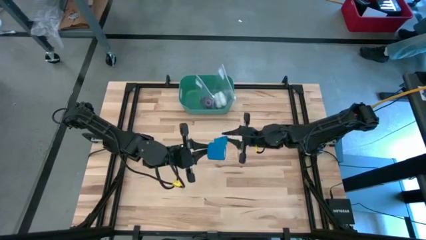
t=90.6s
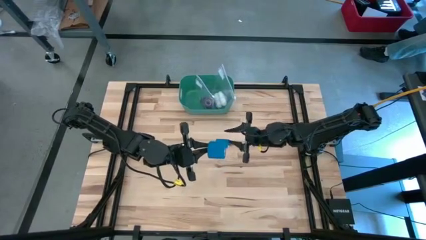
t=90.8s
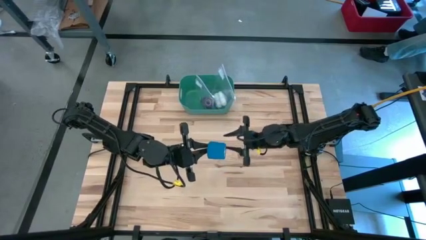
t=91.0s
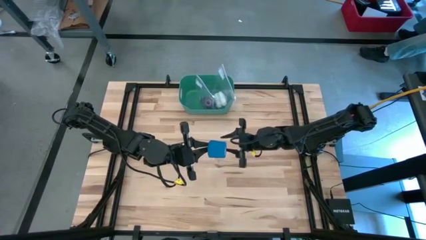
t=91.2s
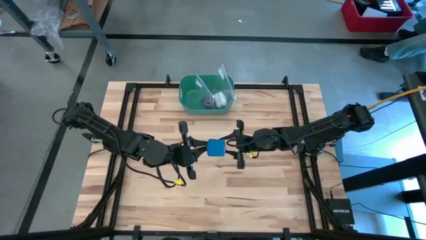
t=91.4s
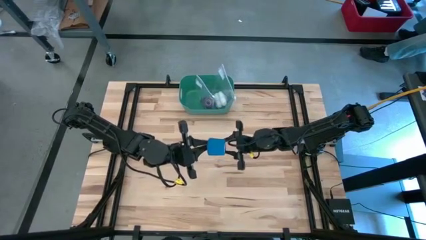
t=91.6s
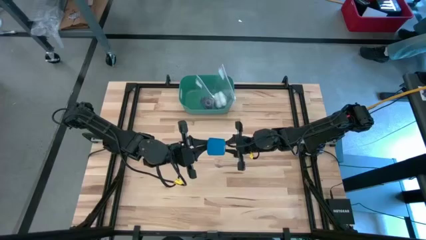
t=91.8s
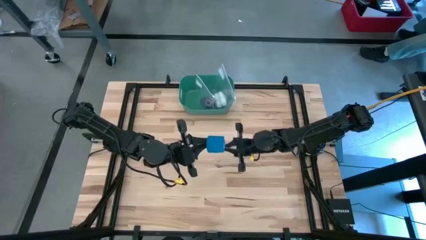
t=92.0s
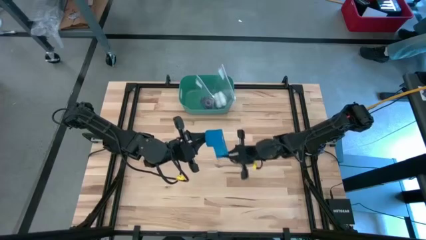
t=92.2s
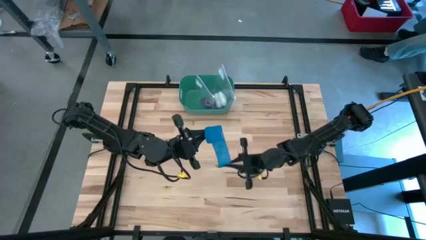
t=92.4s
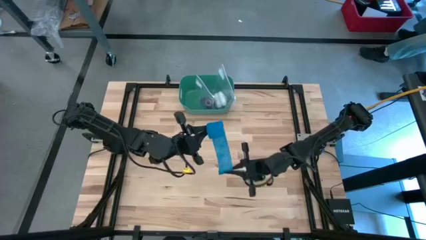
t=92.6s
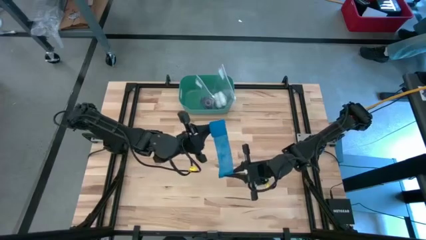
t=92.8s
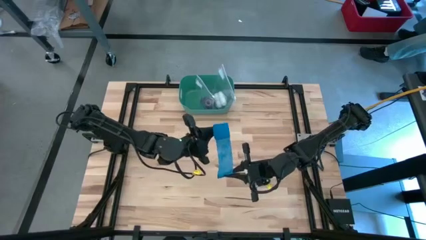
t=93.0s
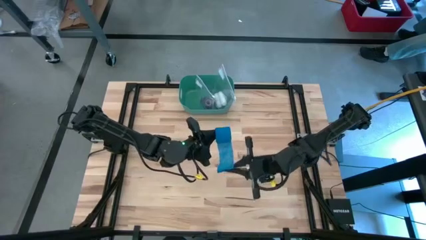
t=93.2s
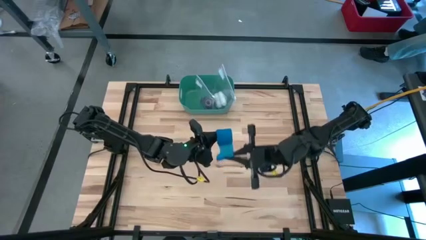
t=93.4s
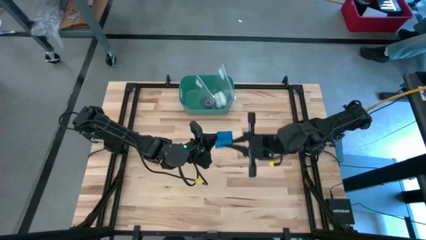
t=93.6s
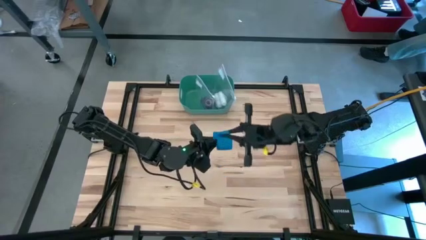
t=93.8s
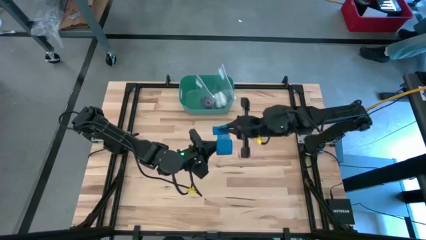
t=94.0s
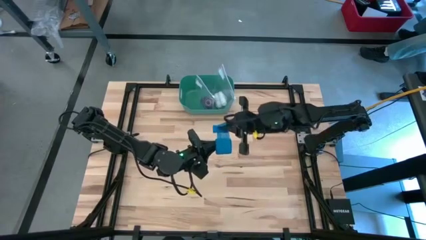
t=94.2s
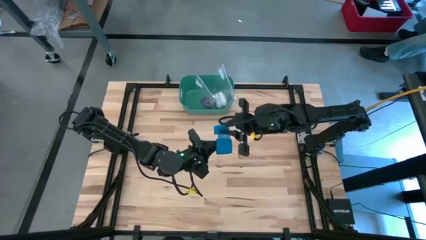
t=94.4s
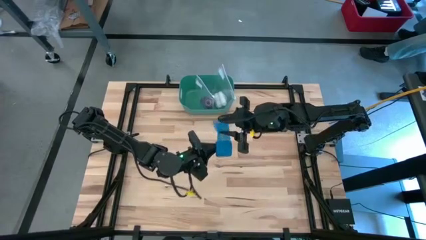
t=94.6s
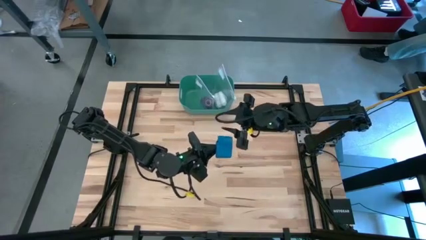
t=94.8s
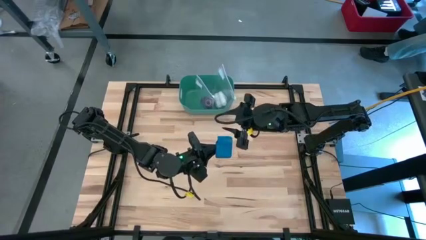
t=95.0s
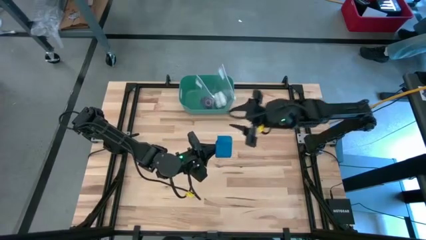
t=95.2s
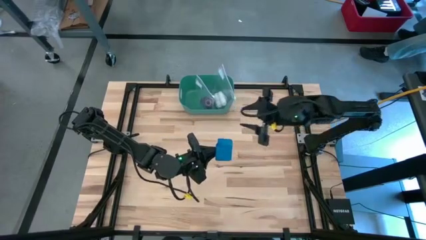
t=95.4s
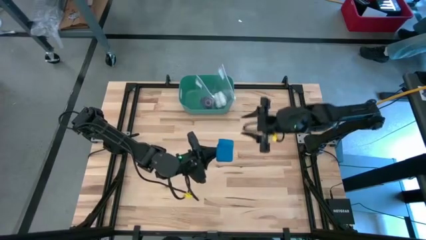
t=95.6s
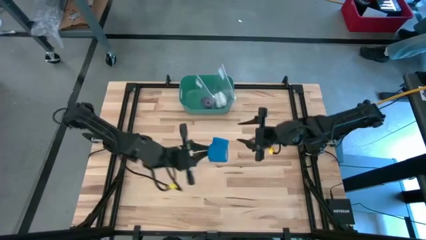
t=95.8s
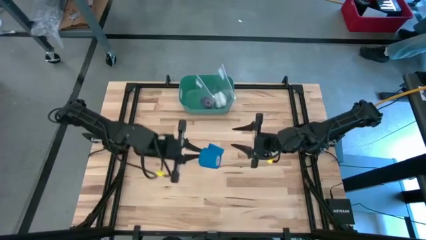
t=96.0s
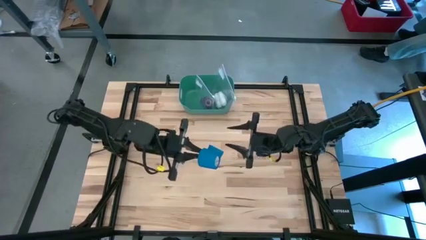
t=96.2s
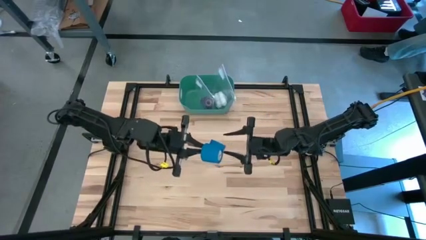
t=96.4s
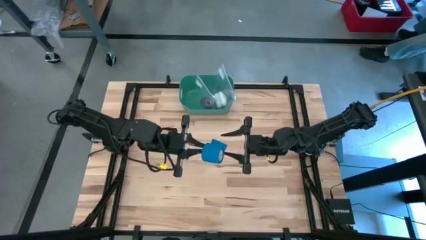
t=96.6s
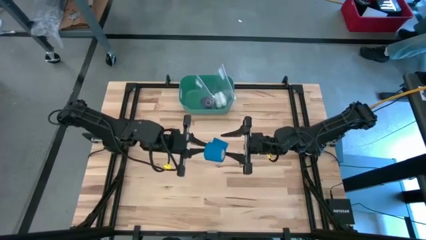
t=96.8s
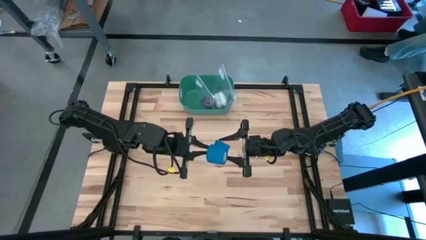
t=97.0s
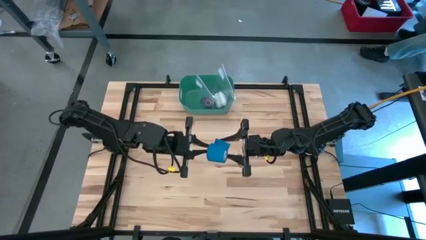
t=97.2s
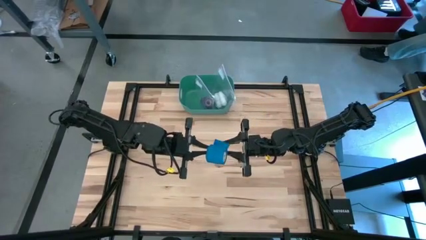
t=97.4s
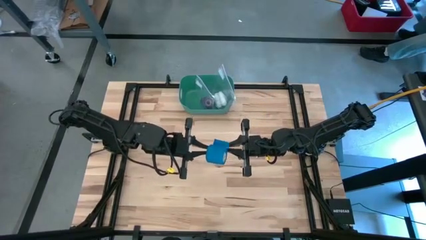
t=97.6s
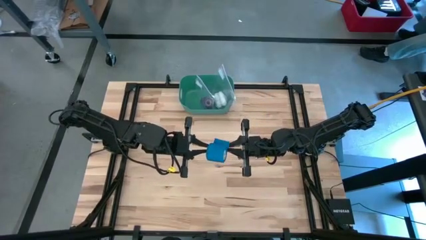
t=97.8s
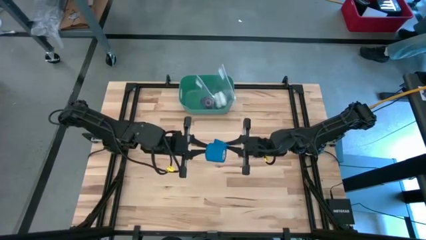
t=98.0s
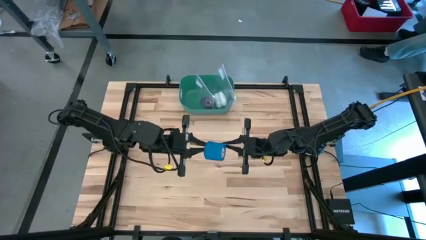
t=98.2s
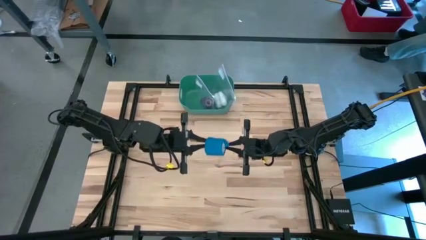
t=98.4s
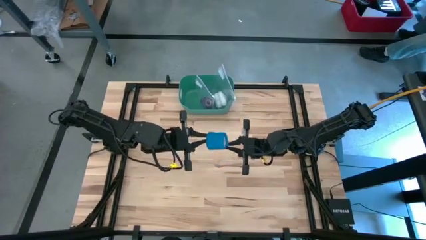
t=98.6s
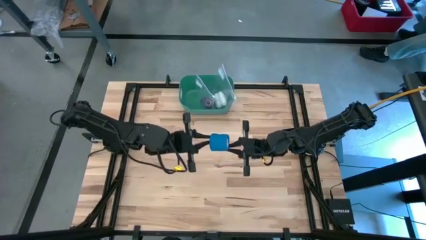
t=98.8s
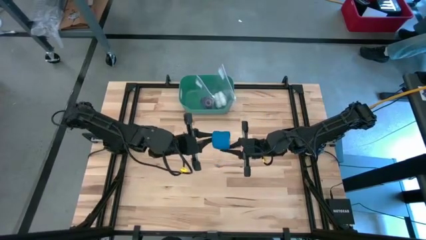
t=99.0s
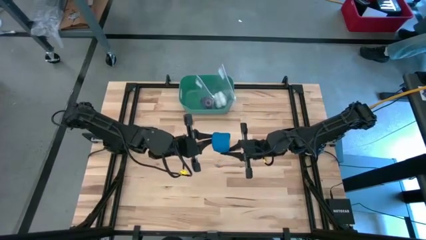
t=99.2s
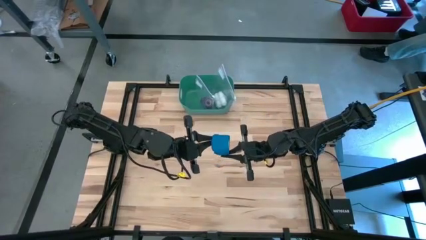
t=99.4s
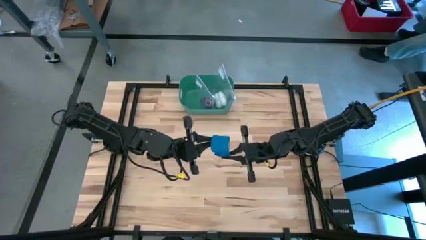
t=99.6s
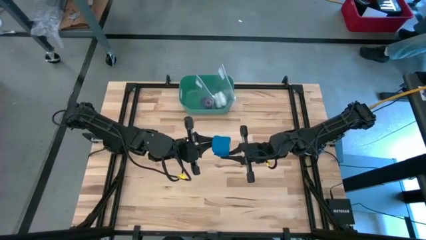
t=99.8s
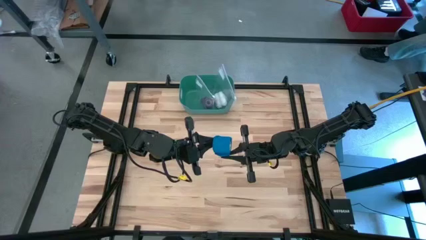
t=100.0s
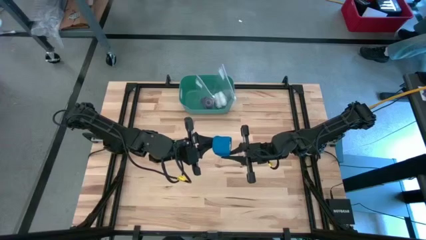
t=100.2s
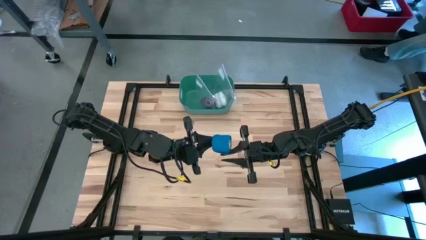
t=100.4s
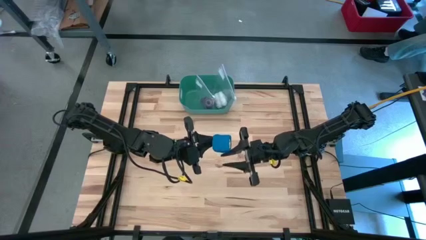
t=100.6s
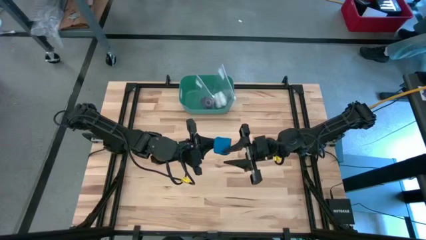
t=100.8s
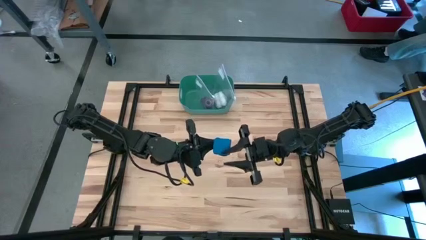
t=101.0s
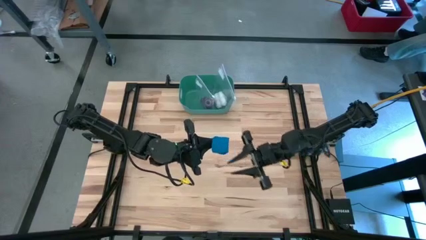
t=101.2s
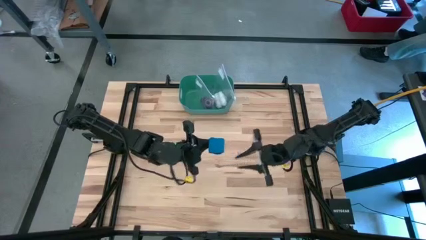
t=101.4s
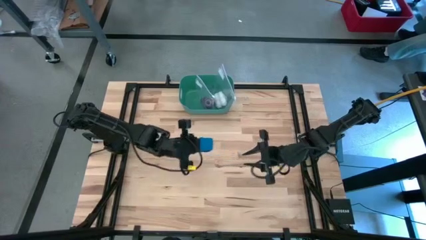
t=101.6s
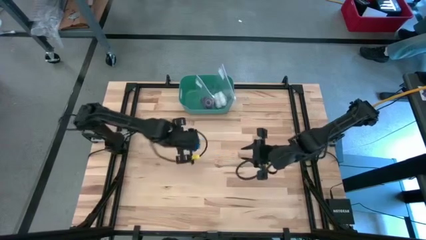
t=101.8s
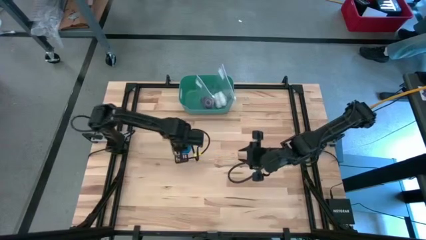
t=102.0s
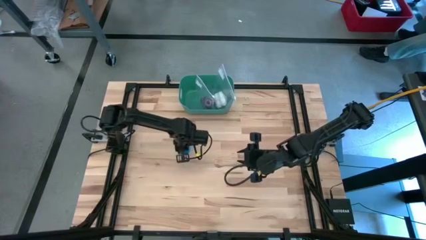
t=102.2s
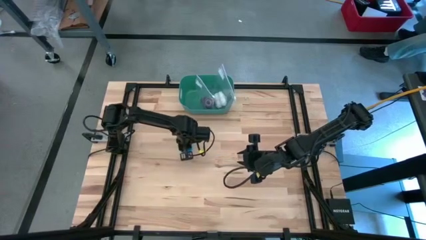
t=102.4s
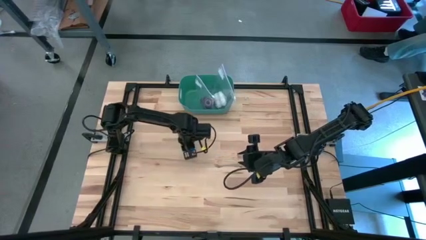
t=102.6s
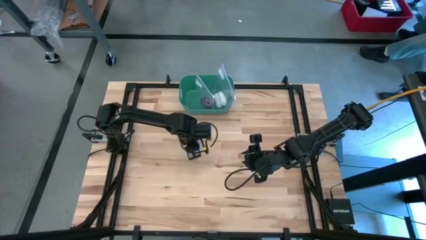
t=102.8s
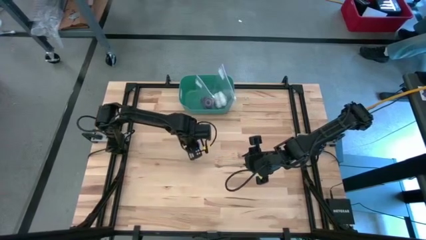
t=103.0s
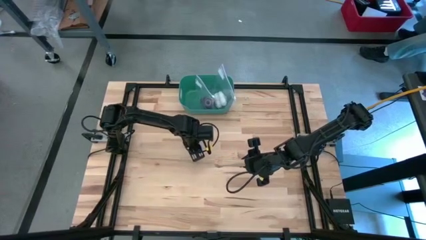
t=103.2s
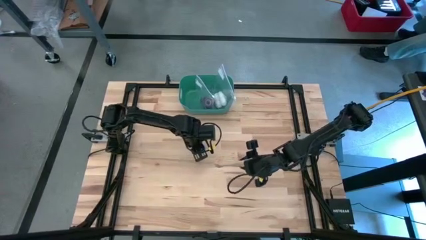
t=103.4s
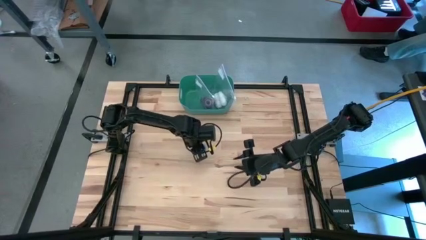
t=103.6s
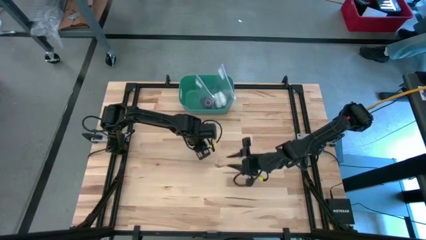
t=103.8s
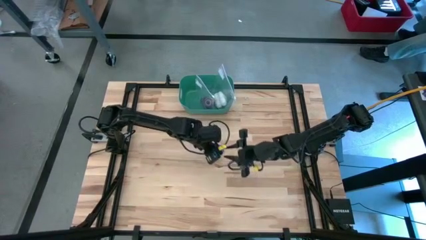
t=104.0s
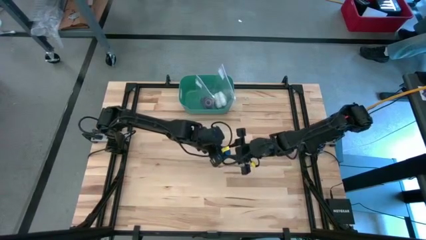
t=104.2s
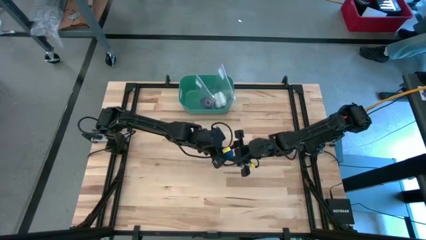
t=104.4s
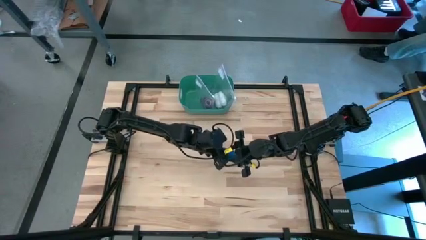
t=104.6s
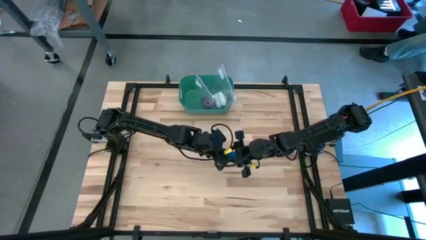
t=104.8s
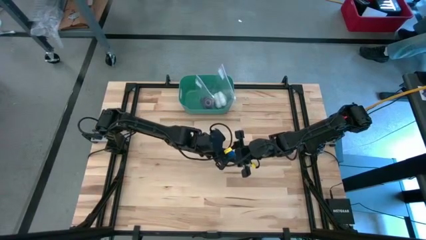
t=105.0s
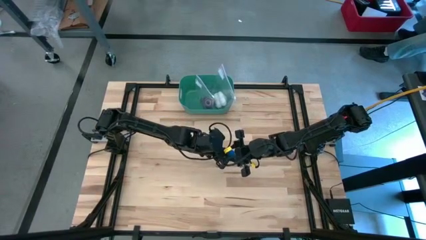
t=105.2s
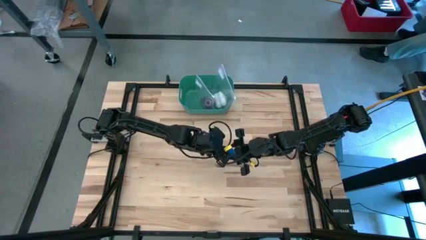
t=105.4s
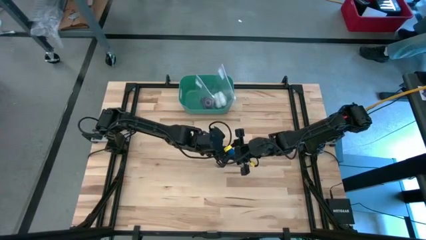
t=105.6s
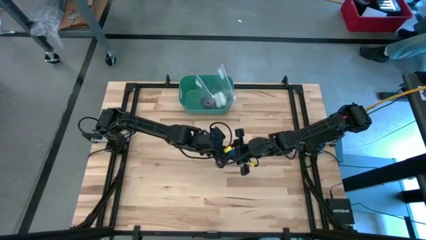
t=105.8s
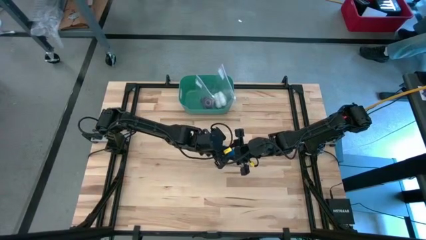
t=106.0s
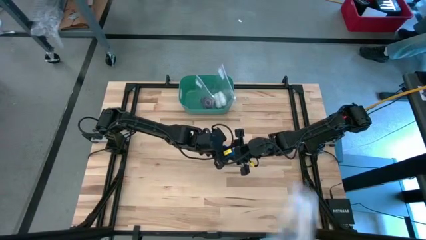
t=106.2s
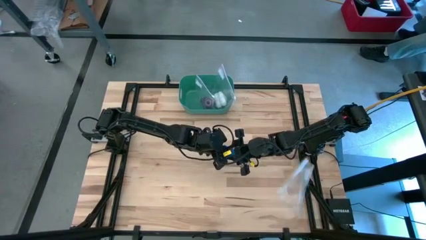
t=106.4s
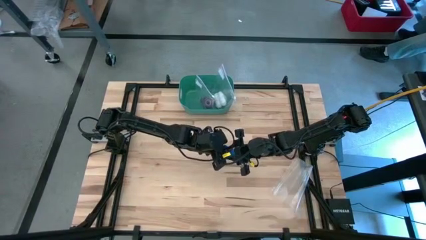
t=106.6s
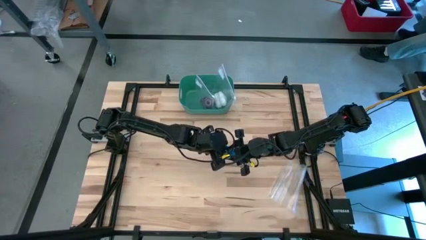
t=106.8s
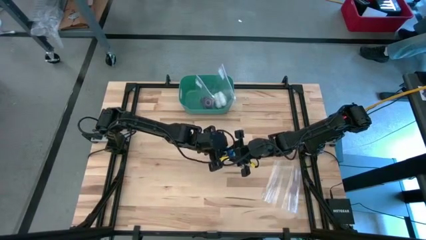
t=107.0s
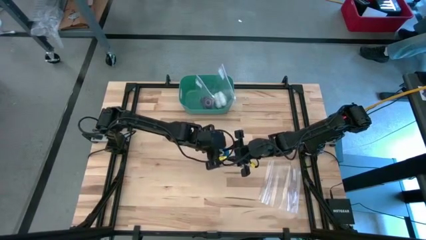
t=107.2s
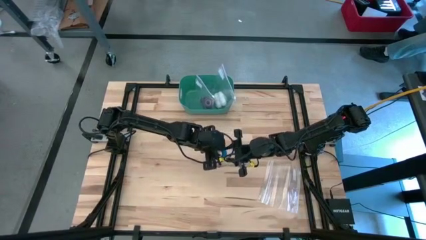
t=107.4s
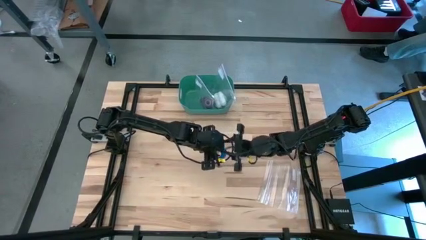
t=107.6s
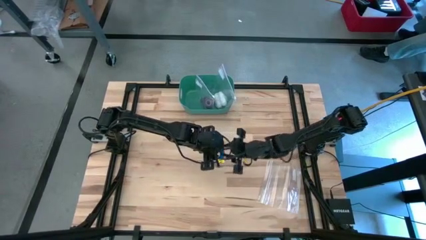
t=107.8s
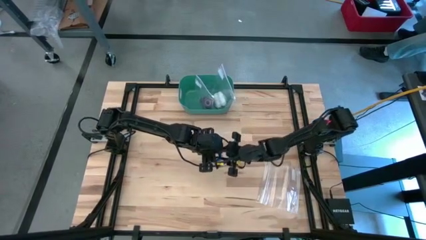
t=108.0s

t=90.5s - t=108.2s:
Task: Roll bandage
Roll the blue bandage
